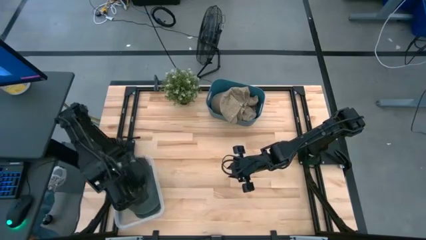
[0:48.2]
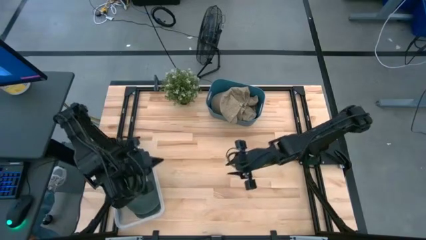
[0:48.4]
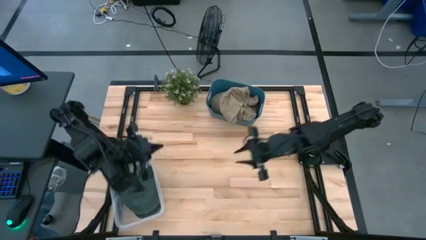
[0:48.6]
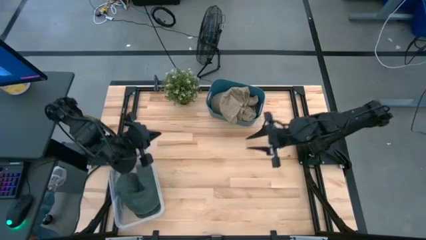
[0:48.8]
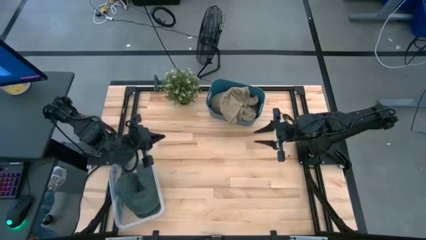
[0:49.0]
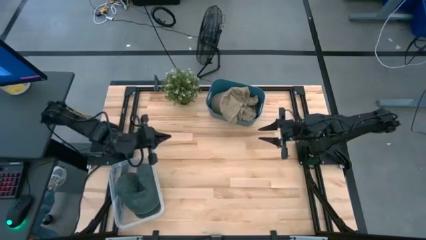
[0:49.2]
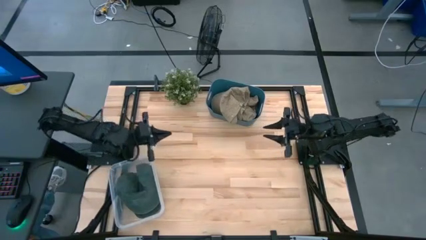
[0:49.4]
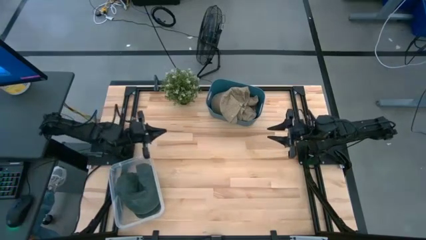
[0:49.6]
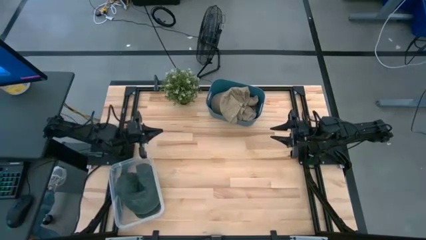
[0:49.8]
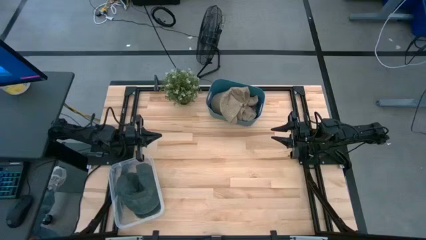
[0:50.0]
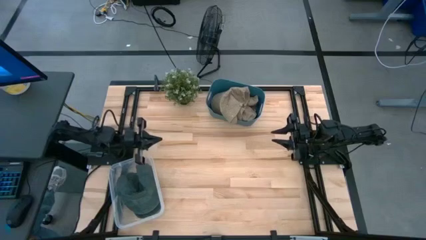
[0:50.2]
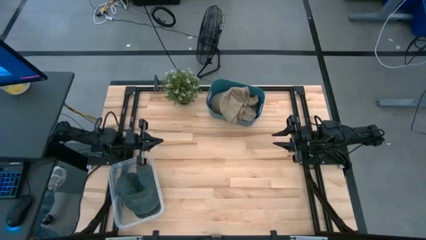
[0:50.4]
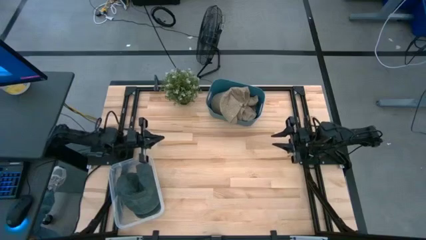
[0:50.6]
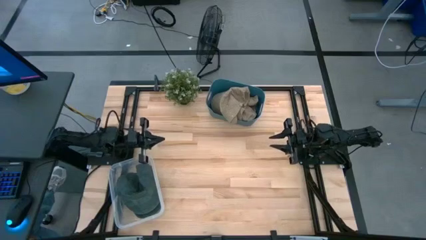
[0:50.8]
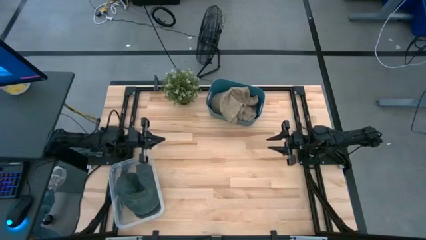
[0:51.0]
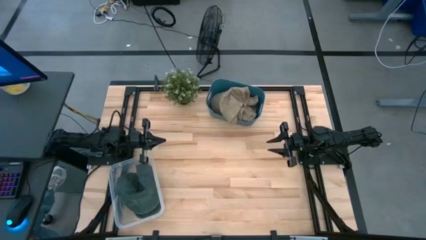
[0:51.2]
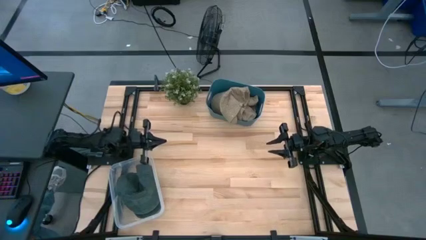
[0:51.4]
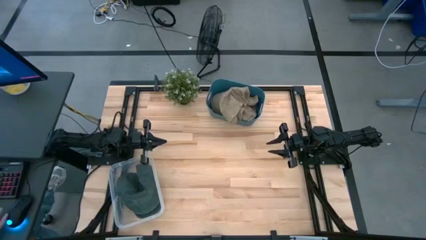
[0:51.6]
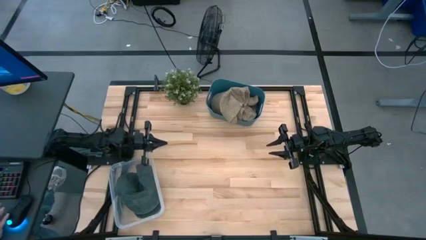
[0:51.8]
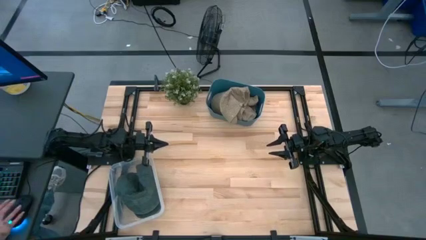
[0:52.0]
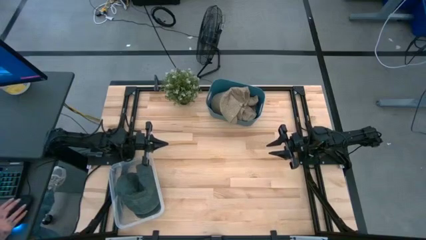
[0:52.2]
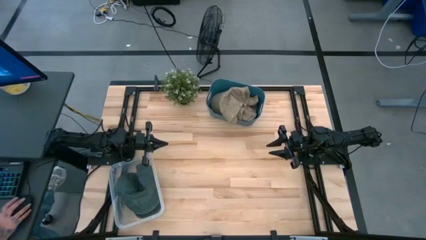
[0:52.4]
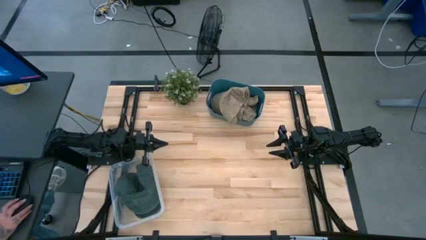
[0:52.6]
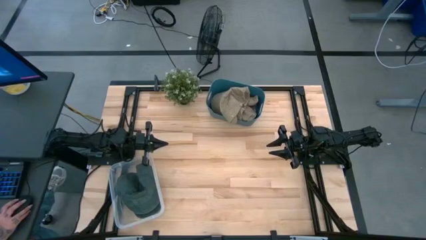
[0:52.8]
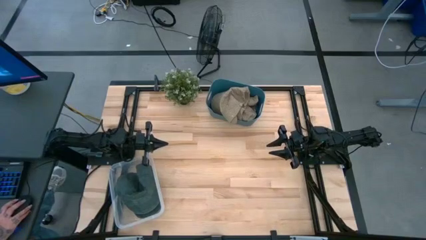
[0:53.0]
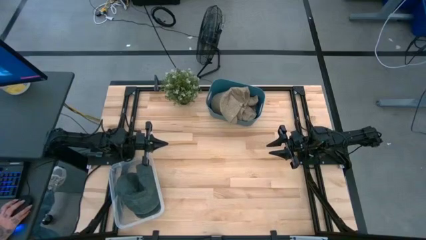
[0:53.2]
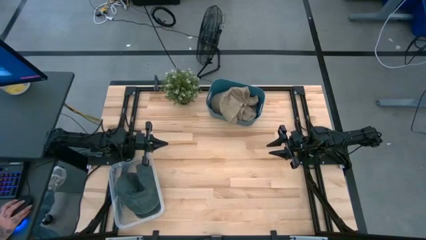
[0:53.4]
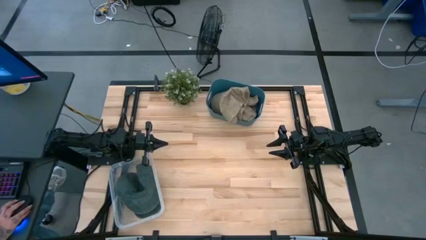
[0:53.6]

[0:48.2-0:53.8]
Task: Pick & Place hat
Return to Home Position

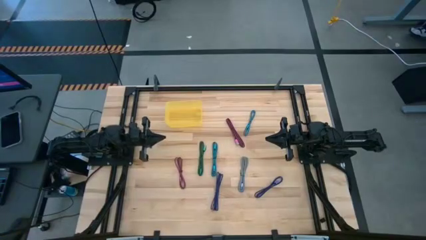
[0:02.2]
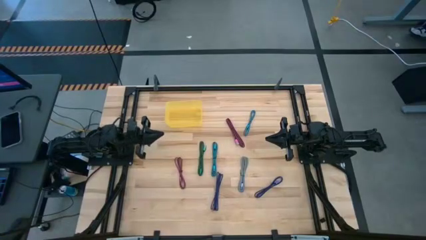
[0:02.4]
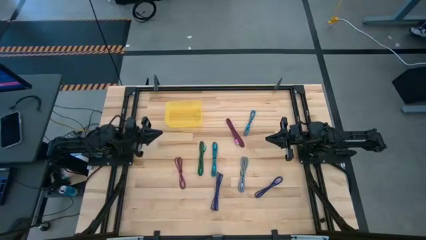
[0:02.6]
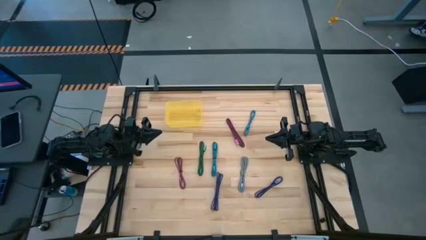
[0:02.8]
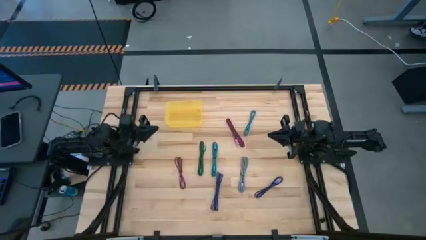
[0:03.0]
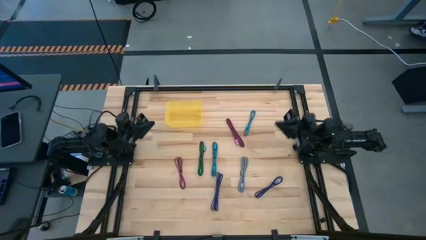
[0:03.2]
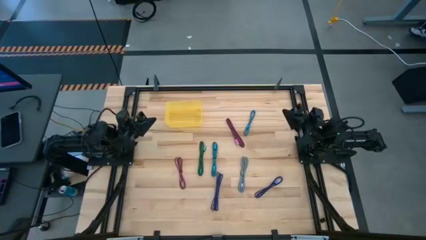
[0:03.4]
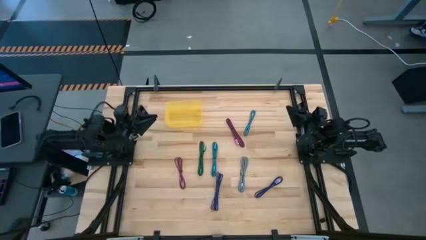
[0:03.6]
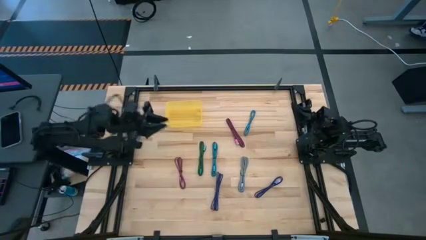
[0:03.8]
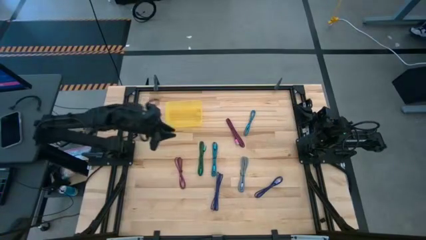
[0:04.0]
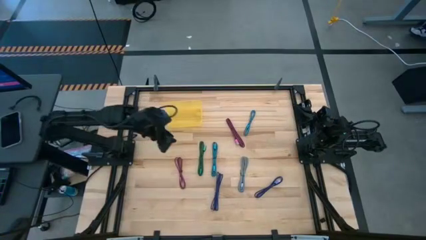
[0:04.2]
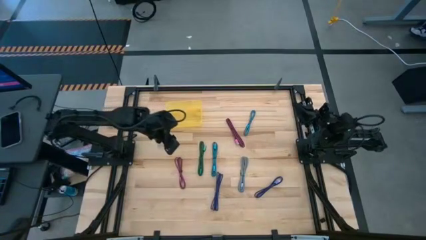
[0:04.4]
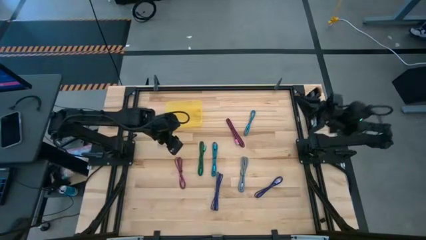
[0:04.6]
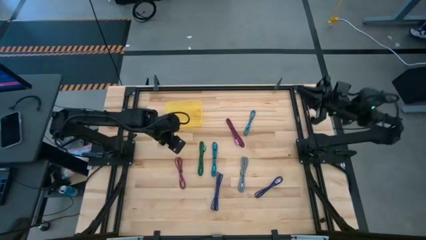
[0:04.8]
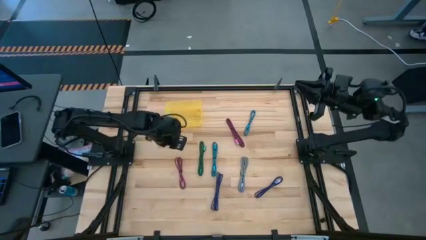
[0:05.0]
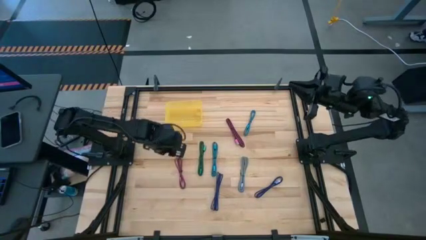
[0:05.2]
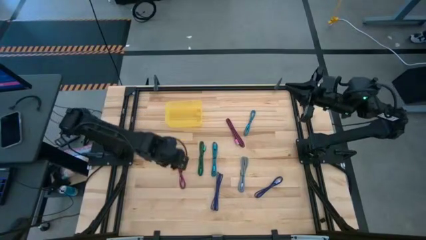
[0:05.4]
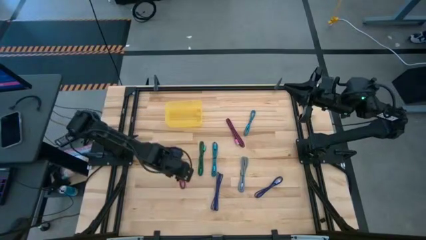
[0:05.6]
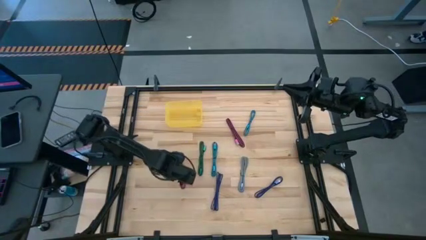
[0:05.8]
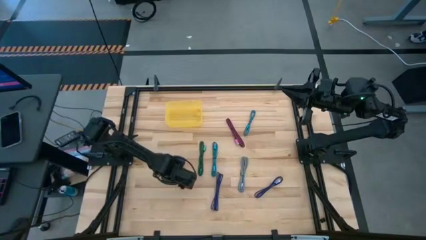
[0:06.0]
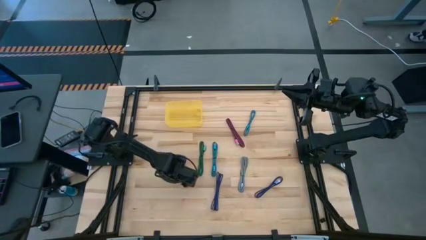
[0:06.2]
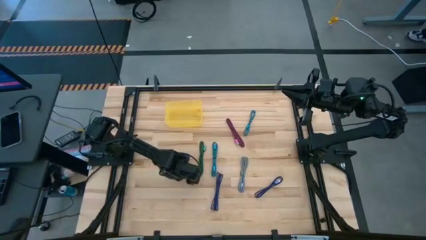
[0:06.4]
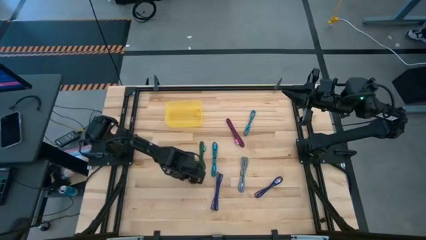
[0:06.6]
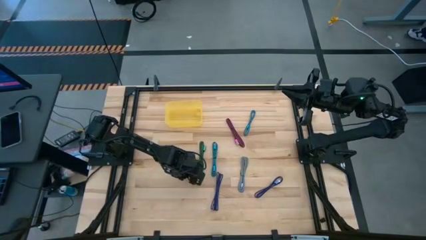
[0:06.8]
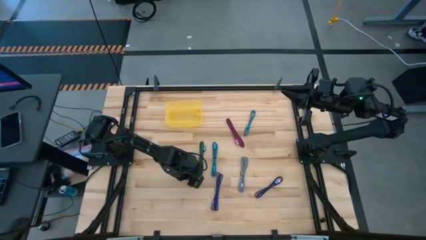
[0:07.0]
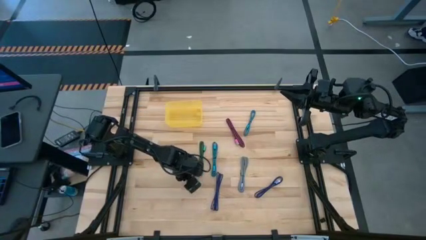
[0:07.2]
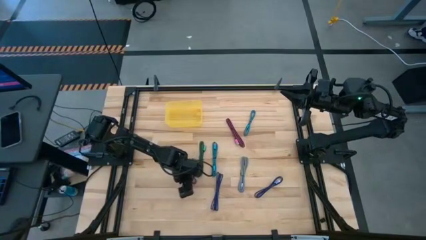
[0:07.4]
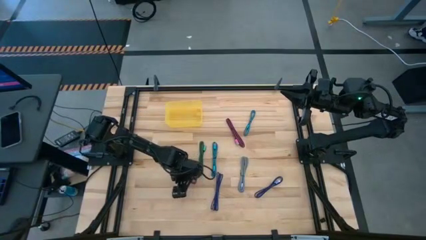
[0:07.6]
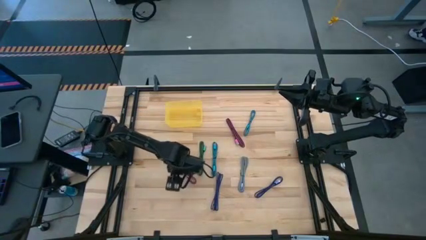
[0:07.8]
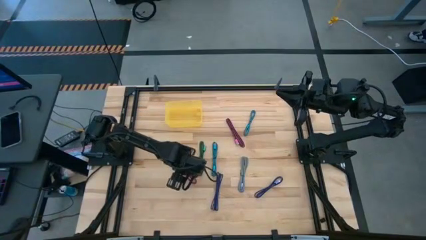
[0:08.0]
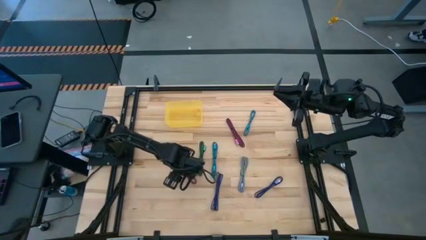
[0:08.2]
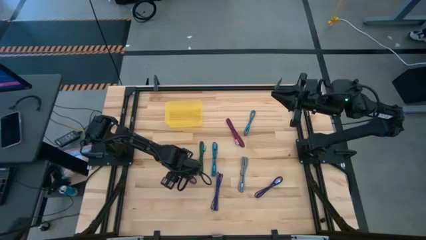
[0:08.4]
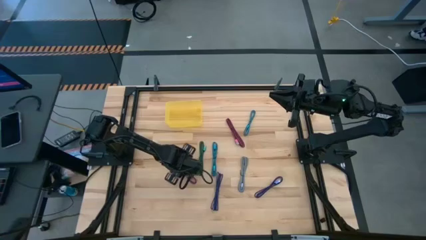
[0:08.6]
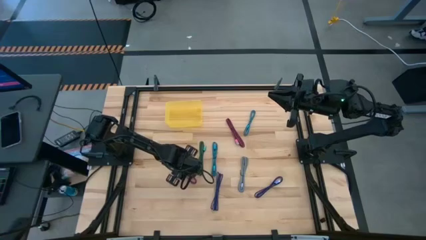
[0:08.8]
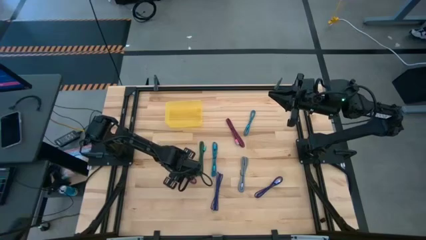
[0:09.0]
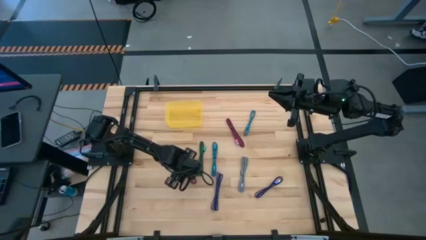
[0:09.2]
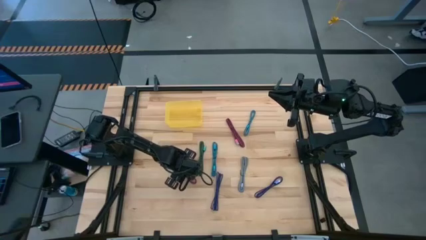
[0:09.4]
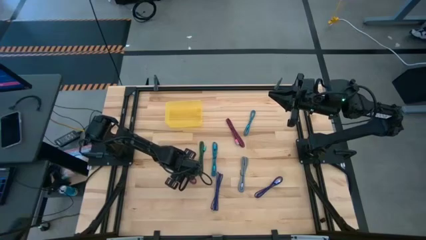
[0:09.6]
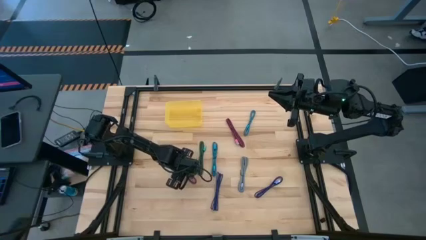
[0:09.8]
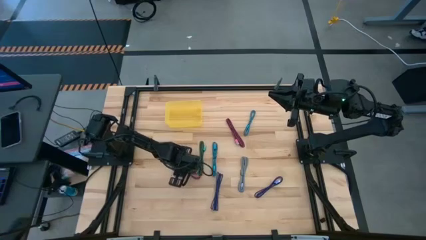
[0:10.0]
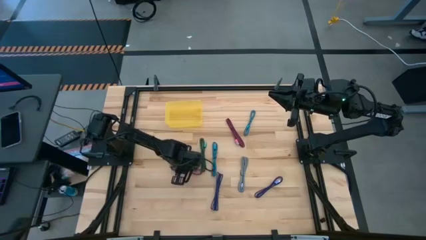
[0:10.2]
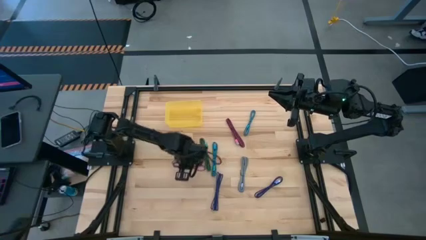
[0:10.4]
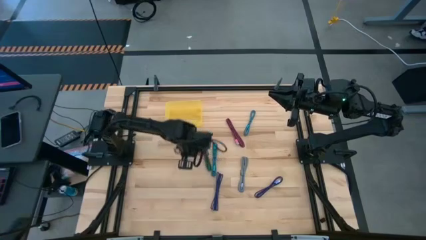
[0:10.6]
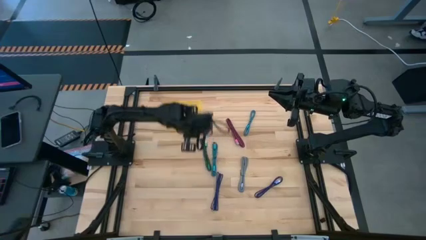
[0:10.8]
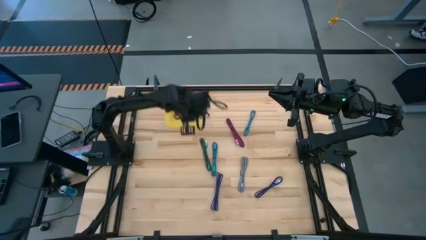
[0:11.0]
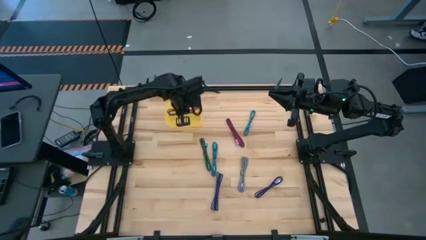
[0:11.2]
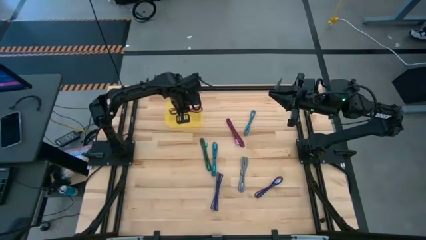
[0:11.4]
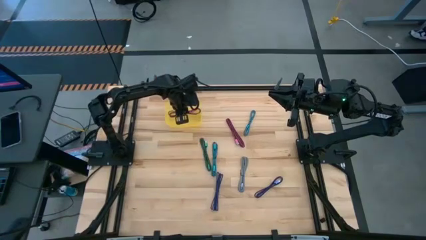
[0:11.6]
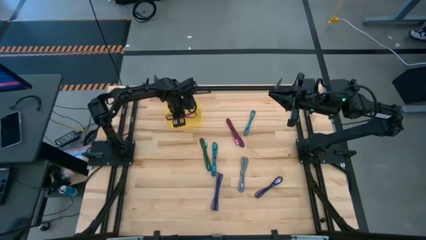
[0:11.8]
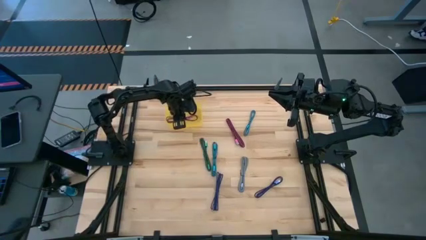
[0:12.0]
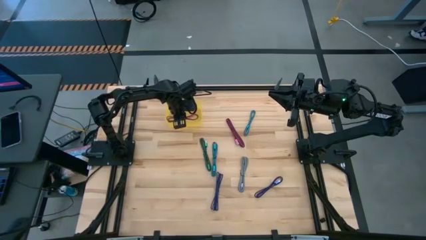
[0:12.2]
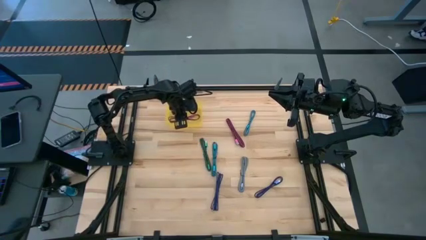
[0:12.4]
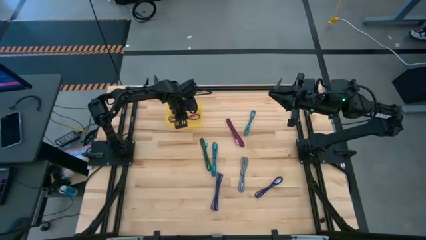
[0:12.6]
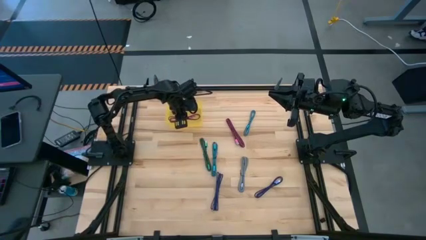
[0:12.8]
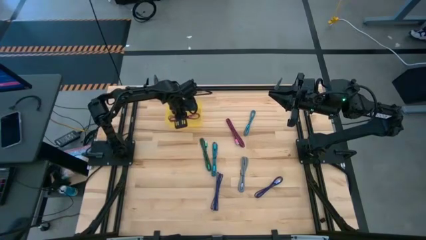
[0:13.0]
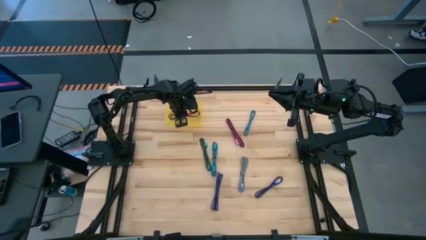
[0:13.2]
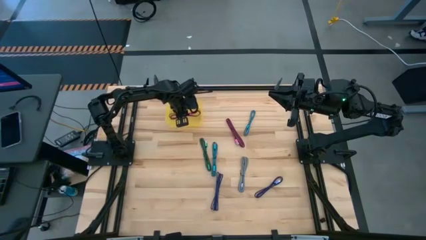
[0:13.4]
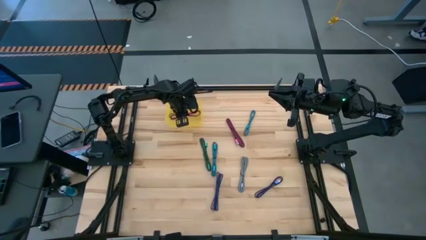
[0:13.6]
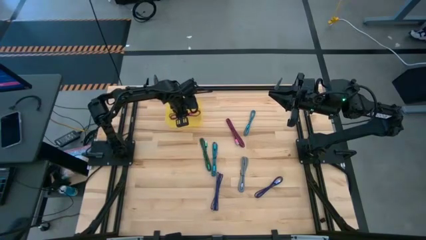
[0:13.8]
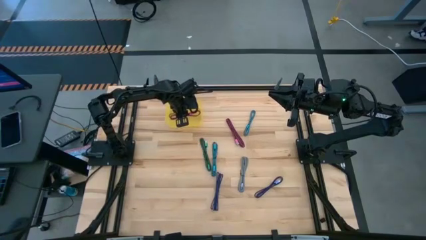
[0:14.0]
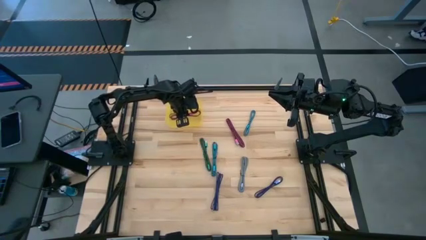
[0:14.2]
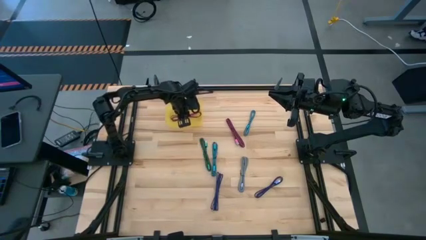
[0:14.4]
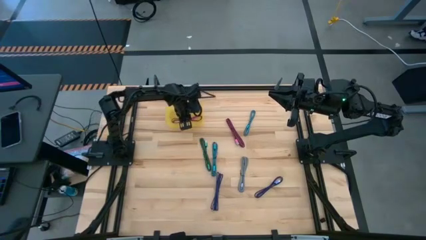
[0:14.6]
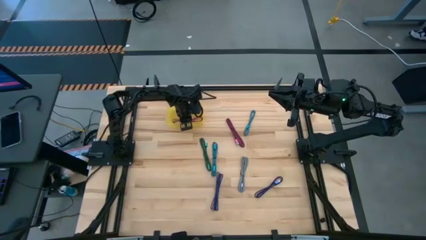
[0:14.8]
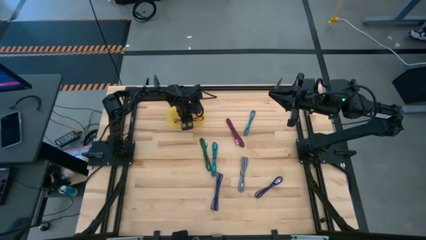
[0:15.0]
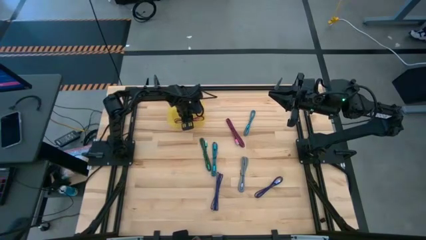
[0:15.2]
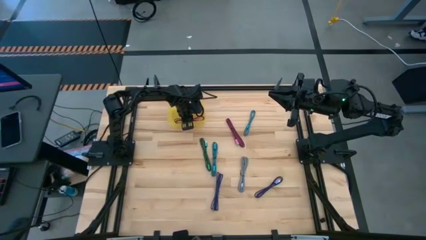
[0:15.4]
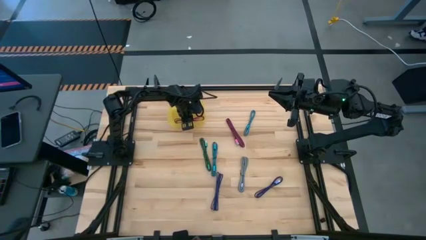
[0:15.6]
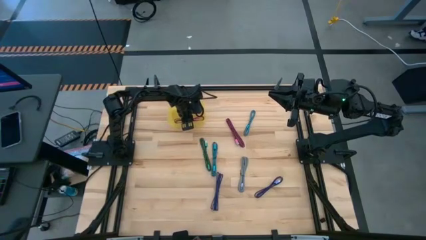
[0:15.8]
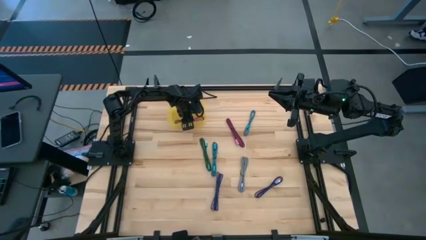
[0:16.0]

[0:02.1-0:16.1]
Task: Pick and place USB-C Cables
Put the bottom pink charger cable into the bin
